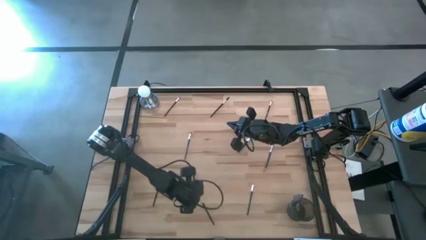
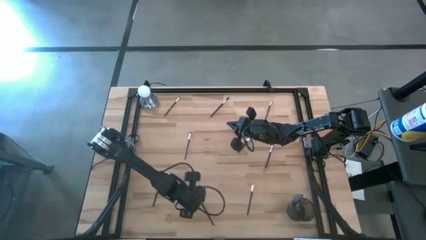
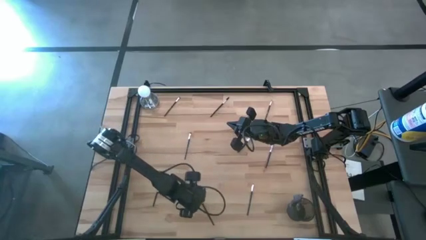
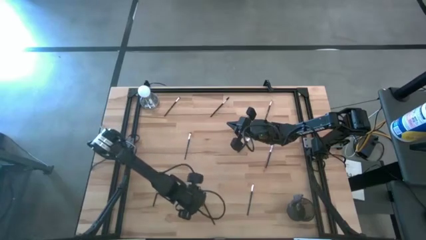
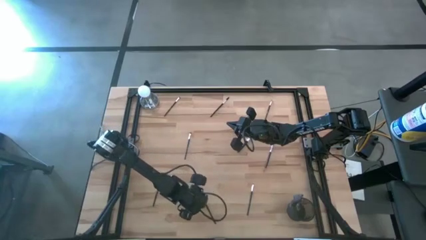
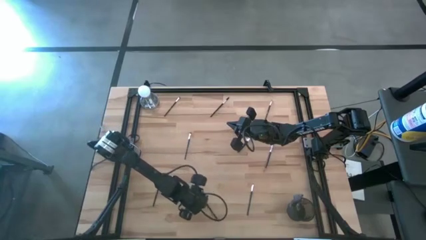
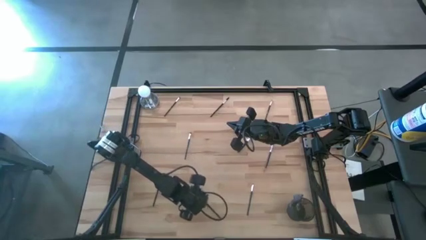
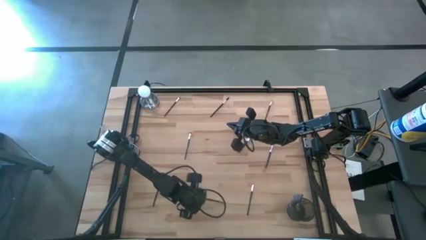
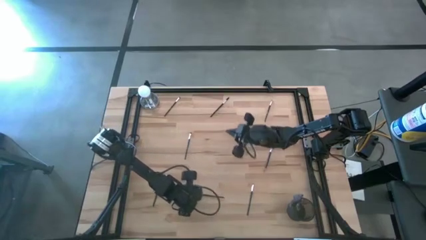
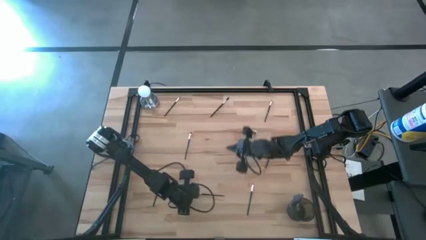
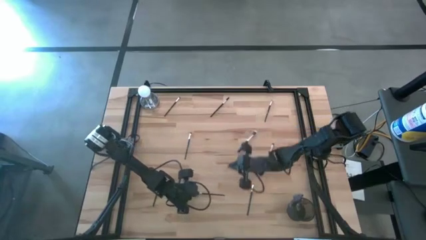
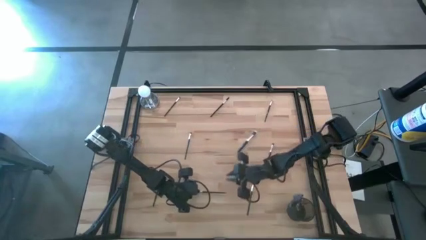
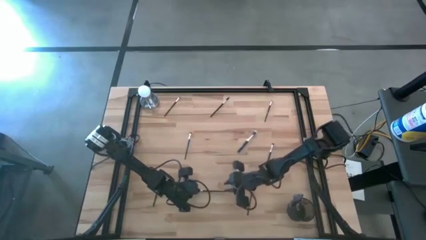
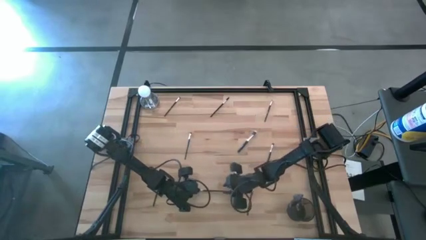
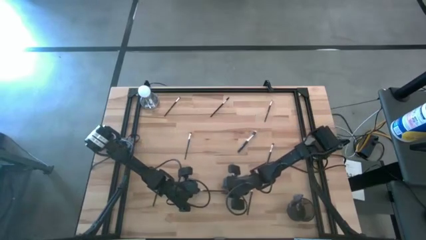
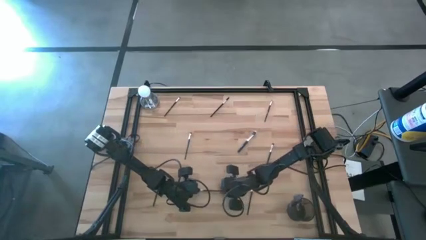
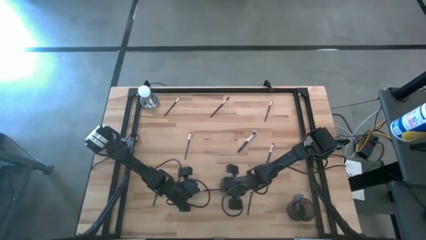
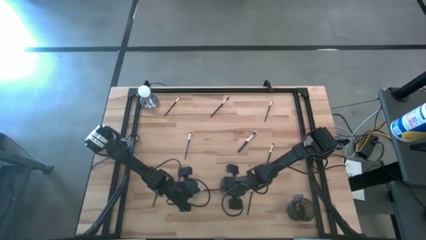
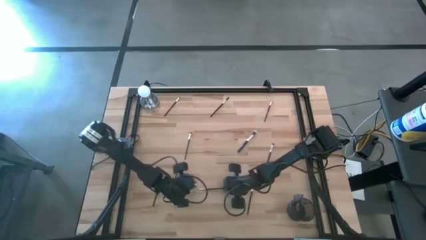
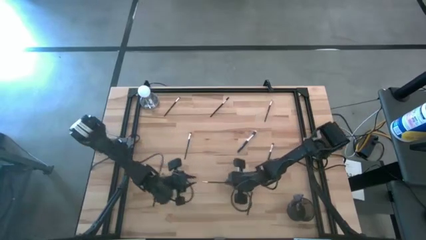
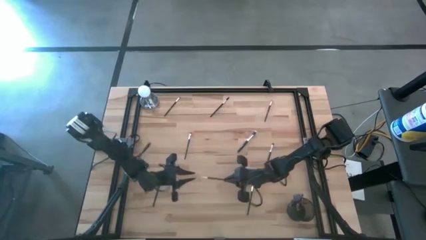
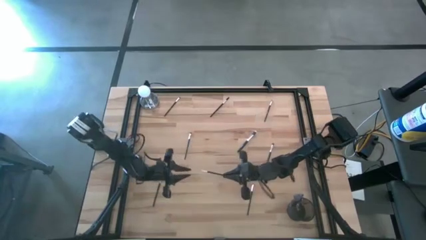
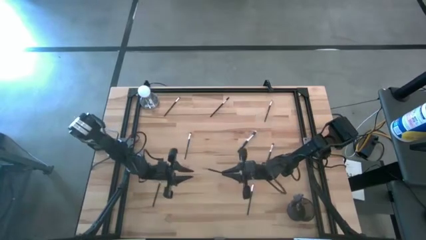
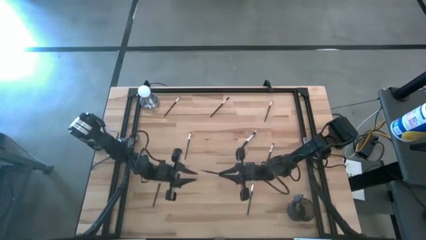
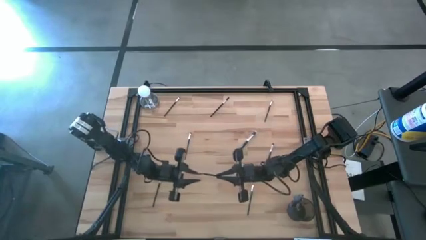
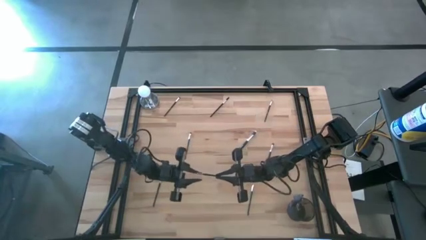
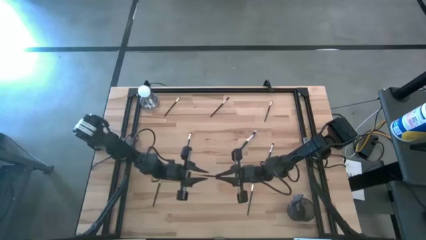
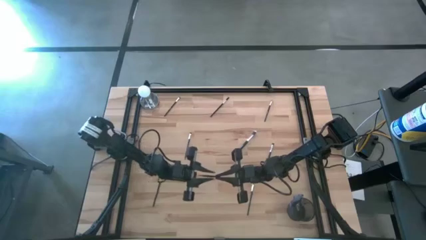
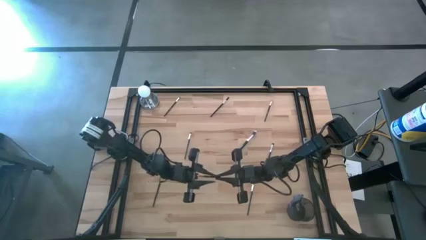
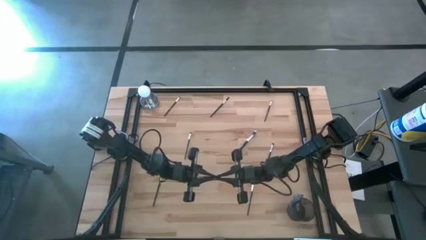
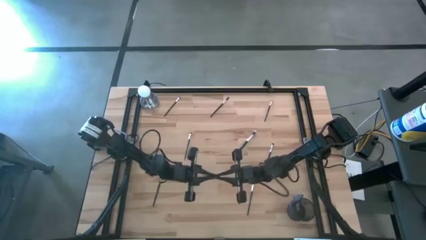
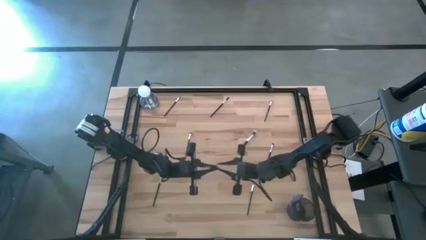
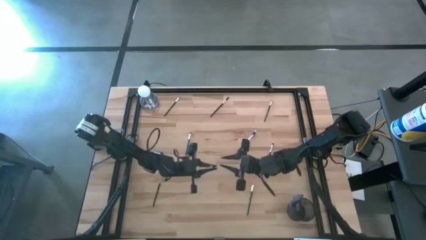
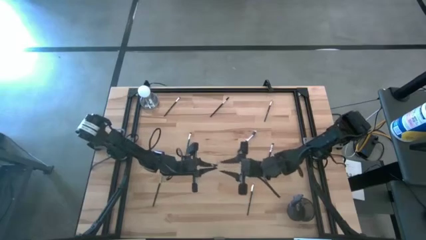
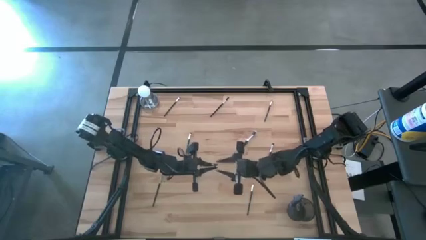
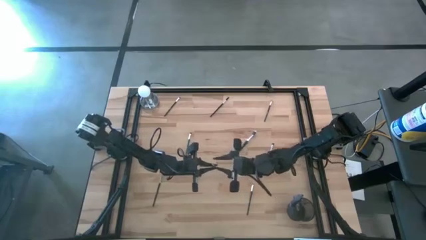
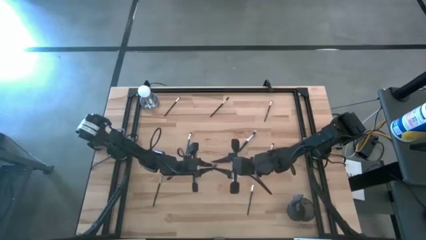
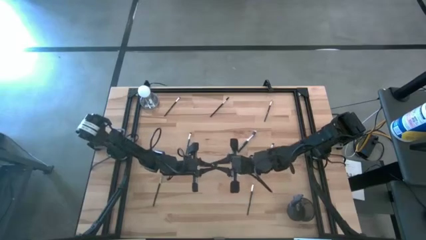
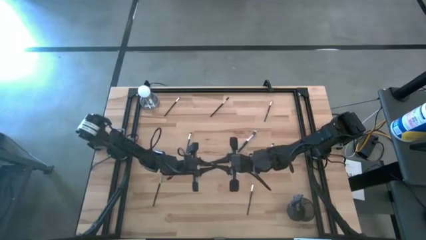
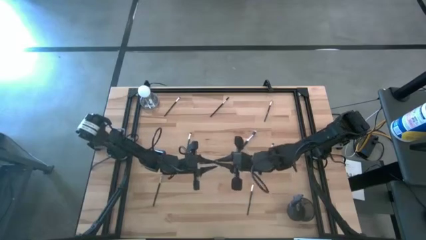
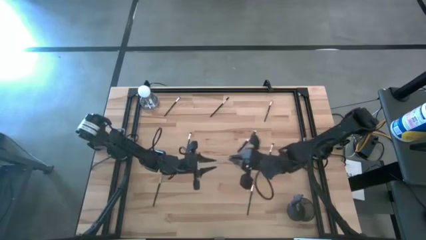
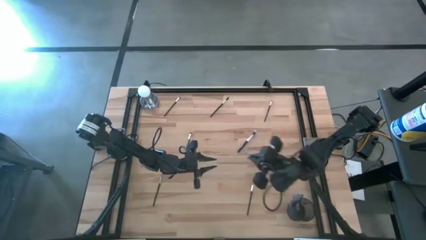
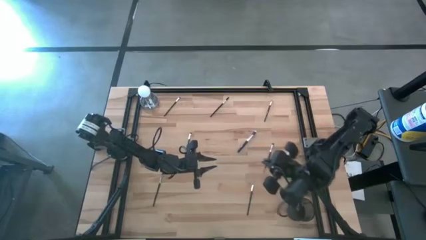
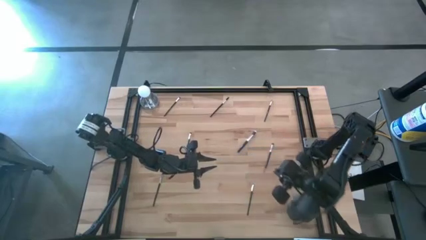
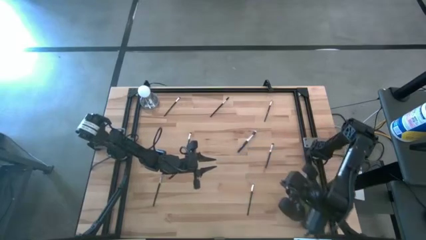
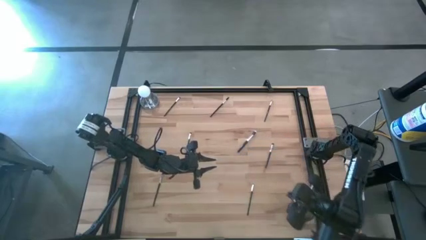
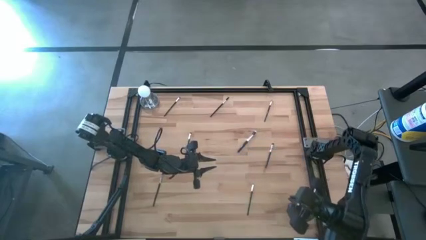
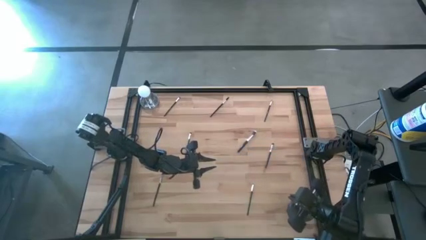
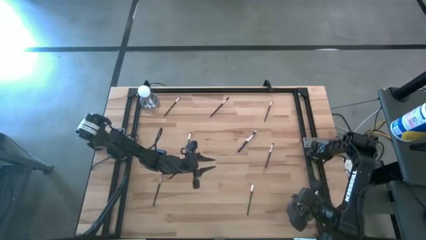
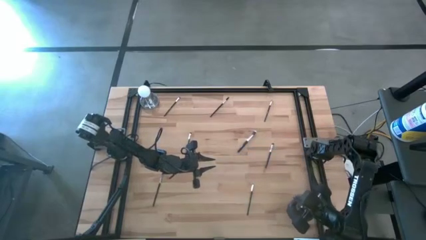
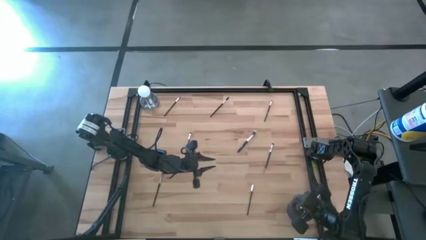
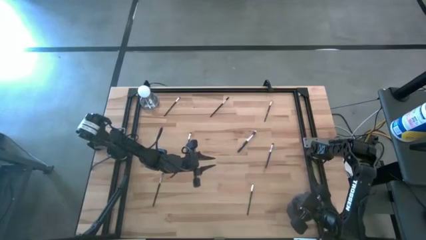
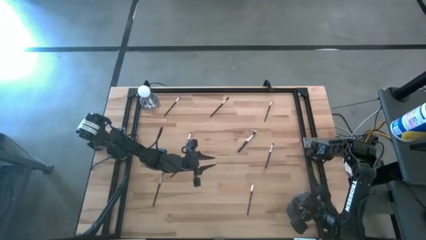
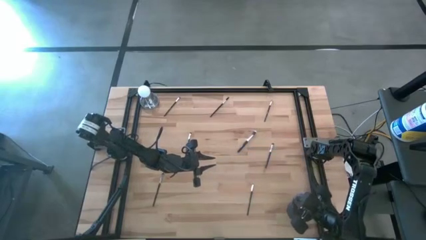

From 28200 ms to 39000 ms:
Task: Pick & Place Makeup Brushes
Put the black liner brush into the makeup holder

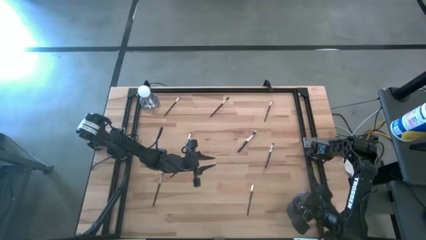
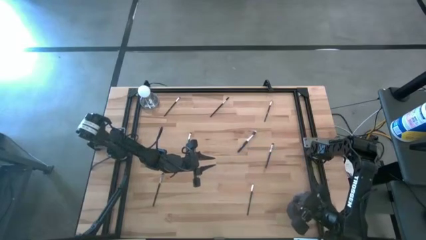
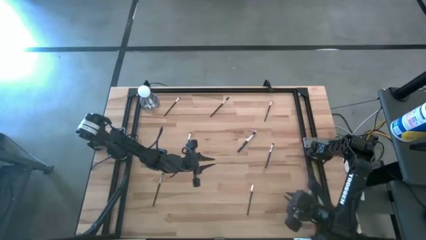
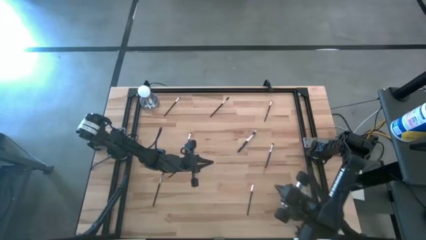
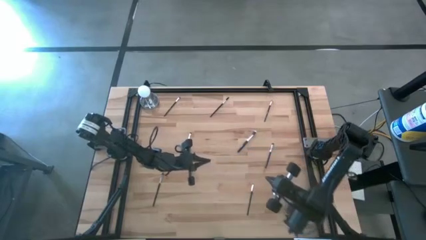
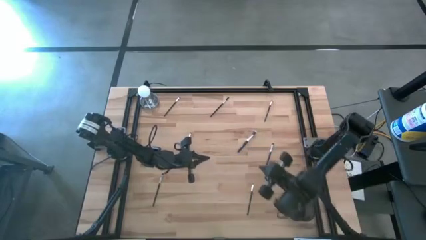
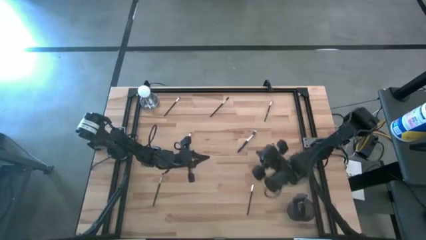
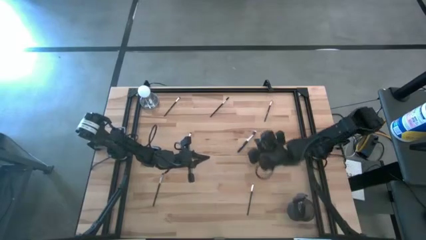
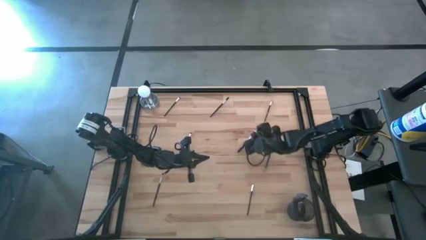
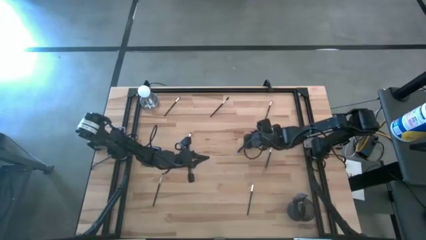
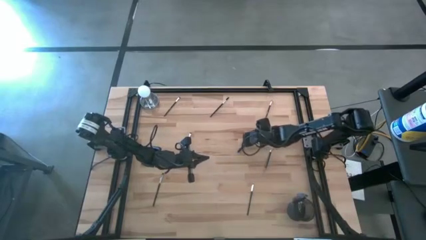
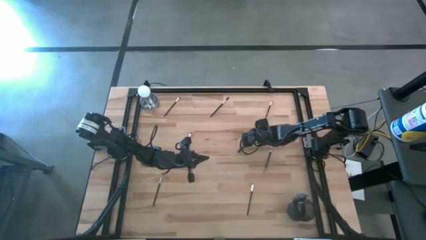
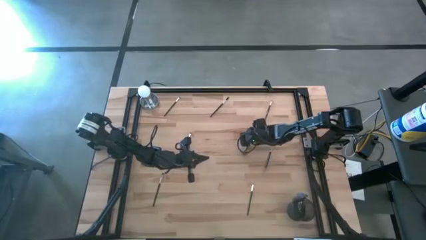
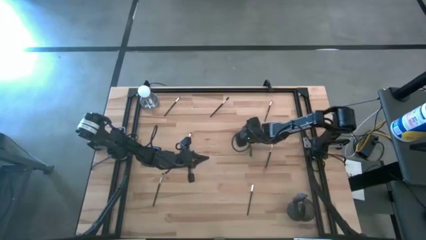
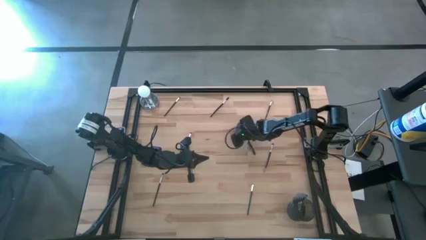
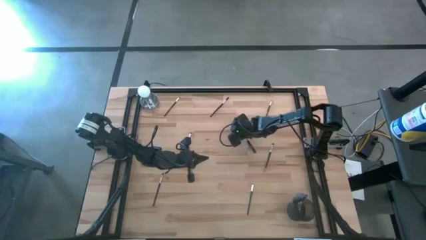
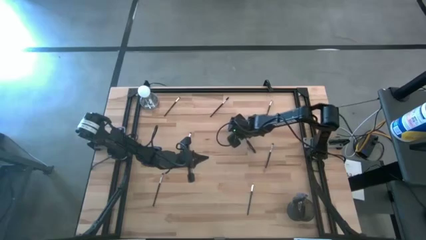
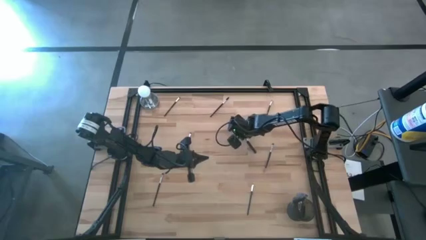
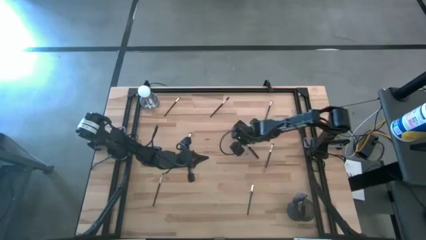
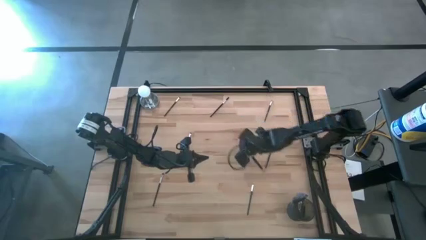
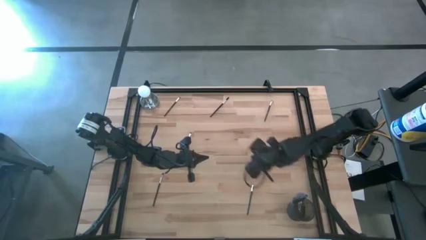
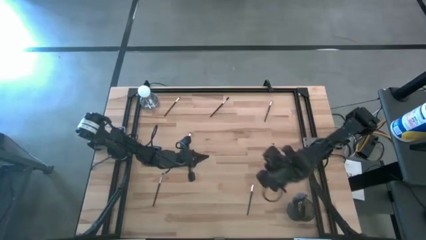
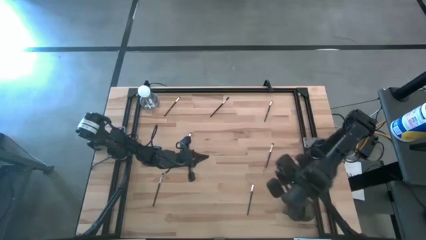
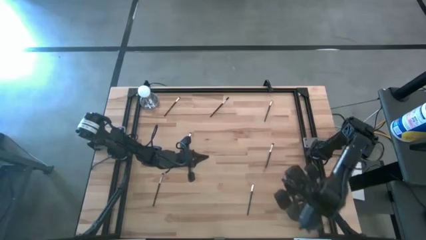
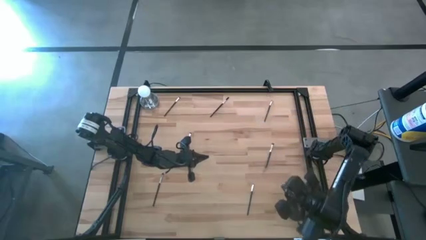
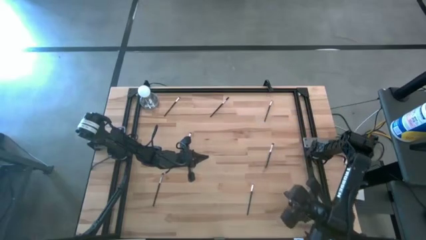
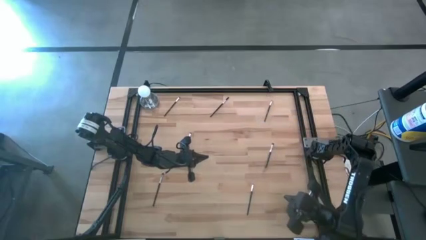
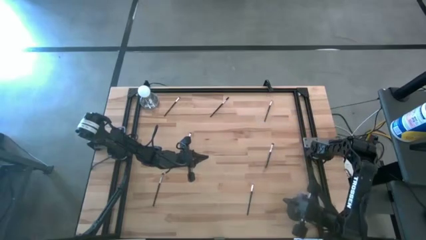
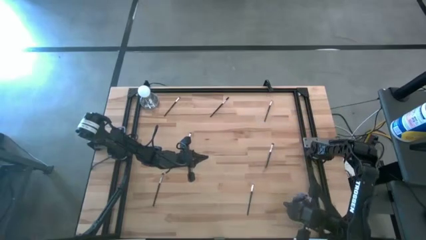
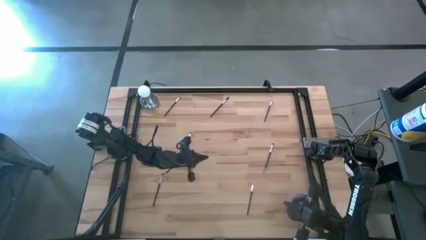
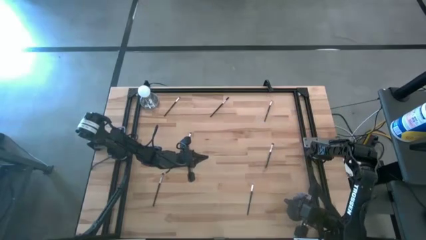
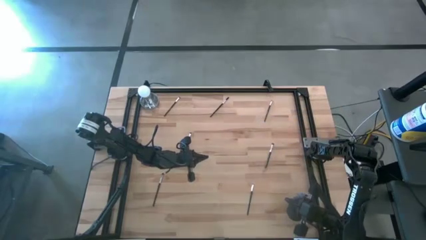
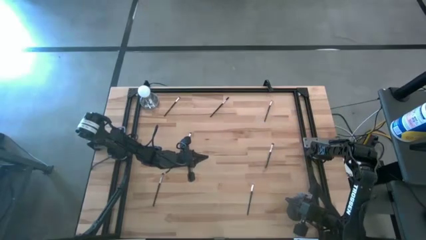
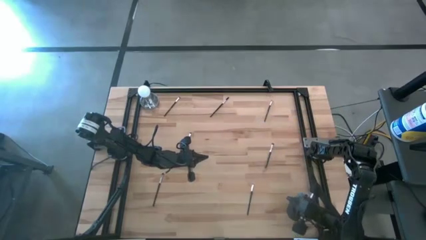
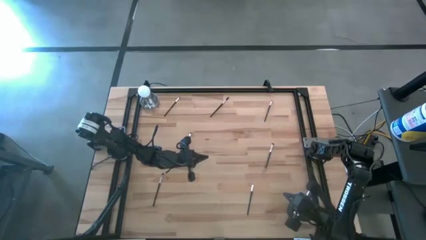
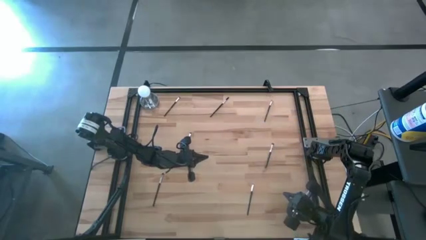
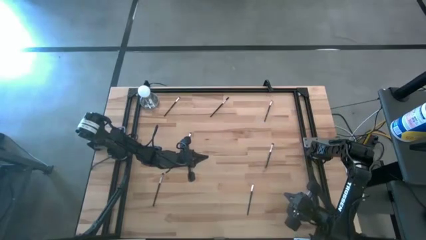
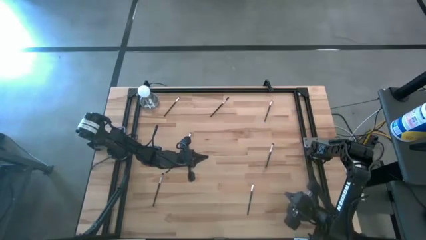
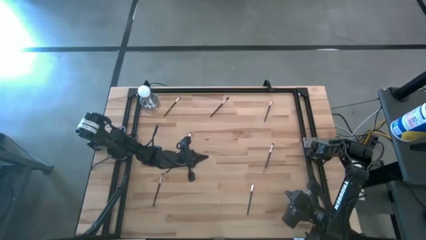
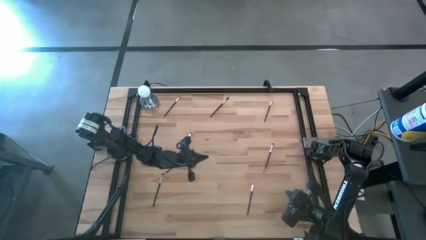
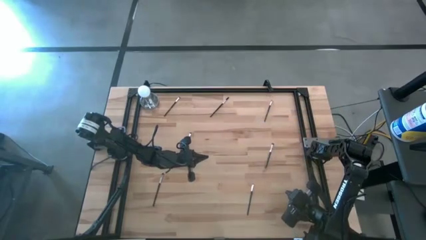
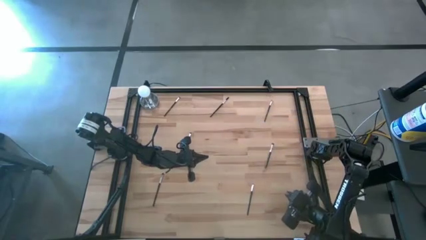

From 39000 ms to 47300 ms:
Put the black foundation brush into the makeup holder
